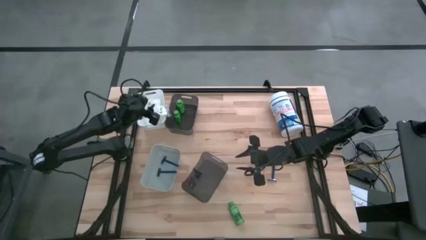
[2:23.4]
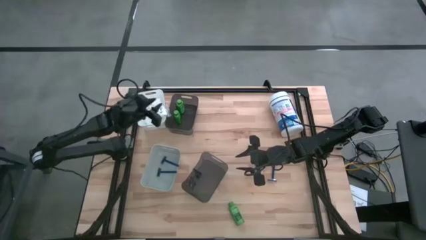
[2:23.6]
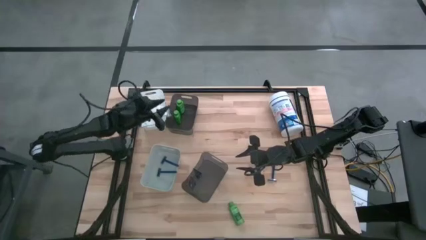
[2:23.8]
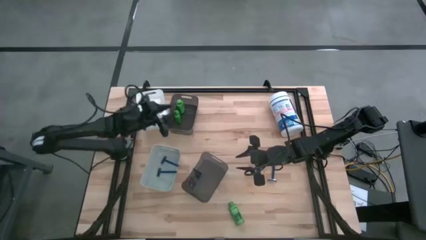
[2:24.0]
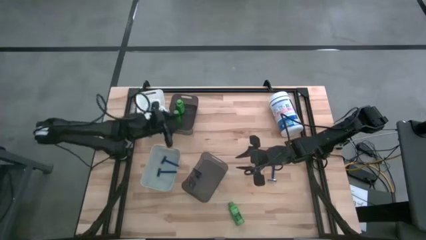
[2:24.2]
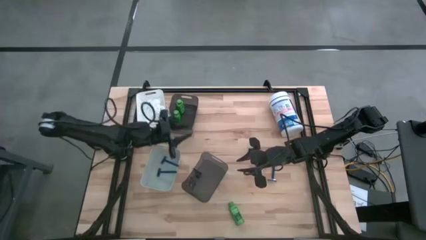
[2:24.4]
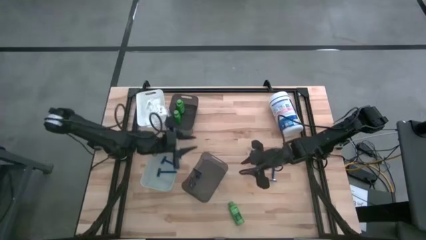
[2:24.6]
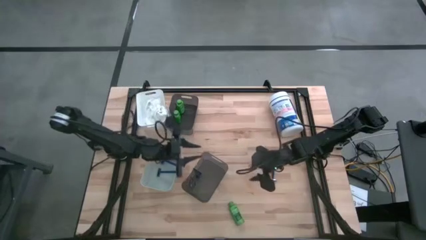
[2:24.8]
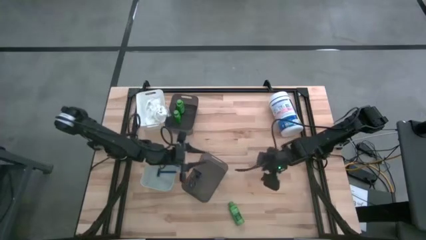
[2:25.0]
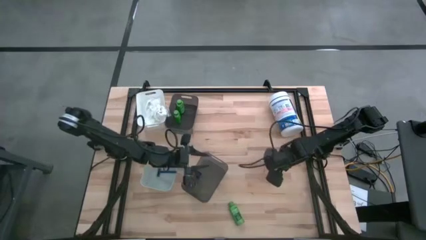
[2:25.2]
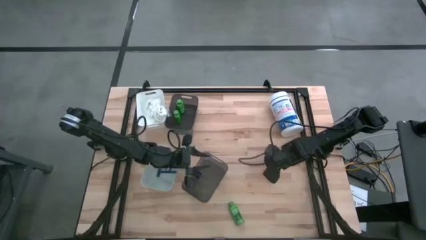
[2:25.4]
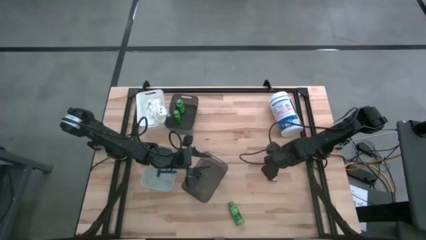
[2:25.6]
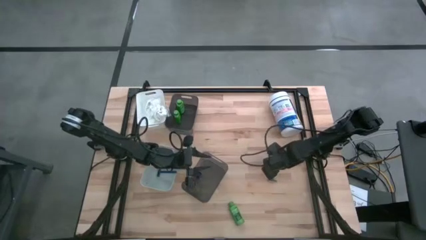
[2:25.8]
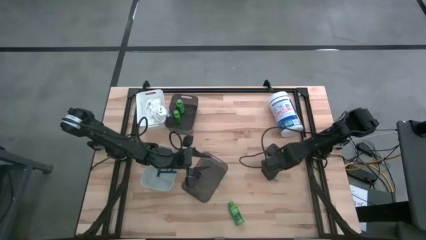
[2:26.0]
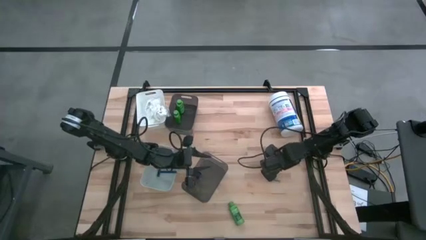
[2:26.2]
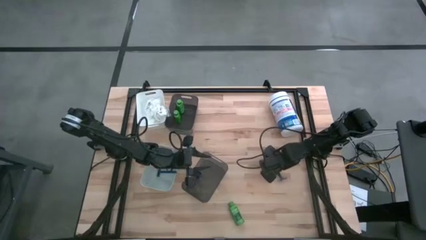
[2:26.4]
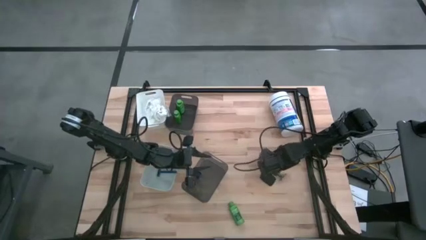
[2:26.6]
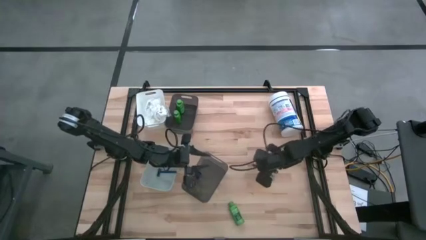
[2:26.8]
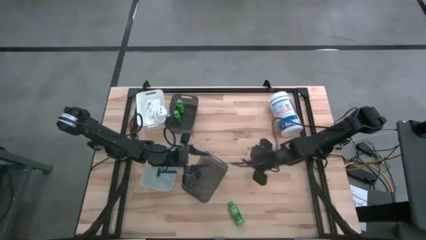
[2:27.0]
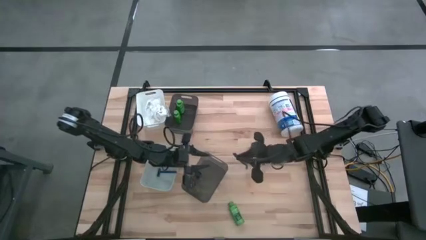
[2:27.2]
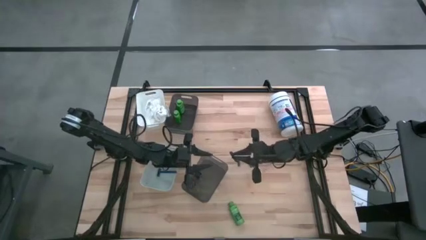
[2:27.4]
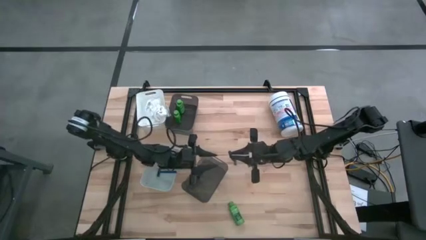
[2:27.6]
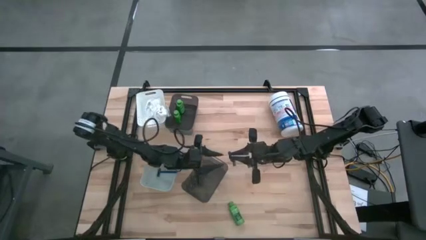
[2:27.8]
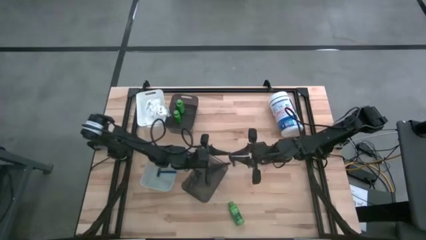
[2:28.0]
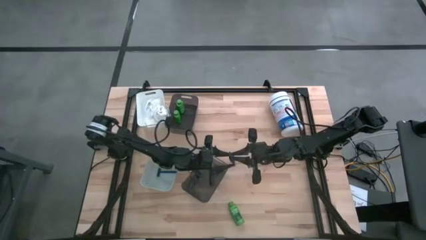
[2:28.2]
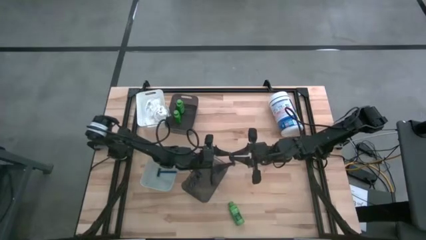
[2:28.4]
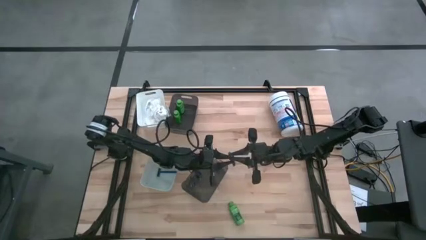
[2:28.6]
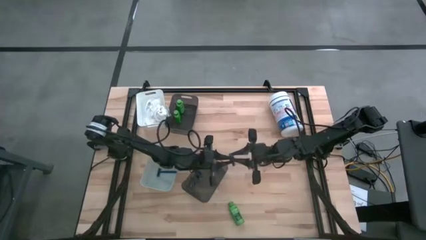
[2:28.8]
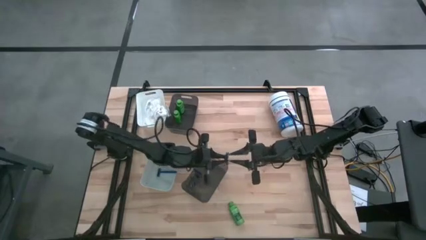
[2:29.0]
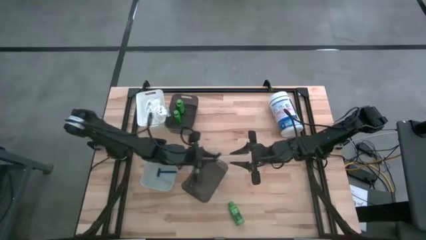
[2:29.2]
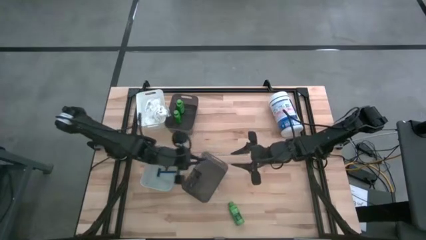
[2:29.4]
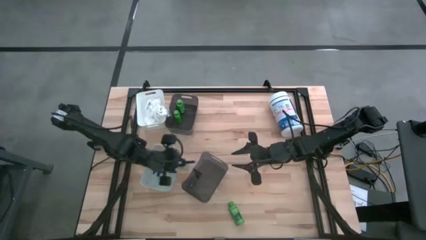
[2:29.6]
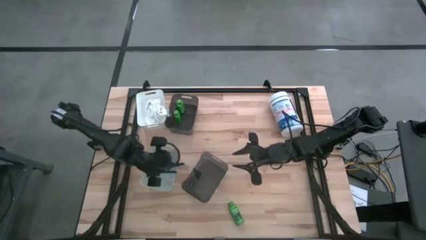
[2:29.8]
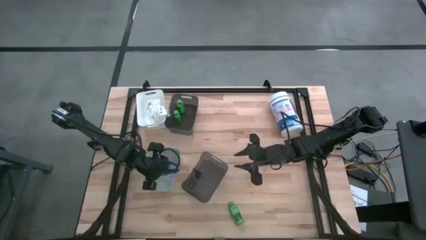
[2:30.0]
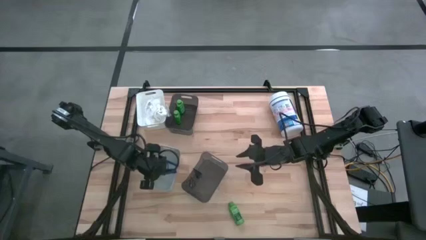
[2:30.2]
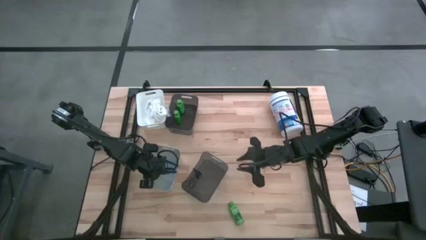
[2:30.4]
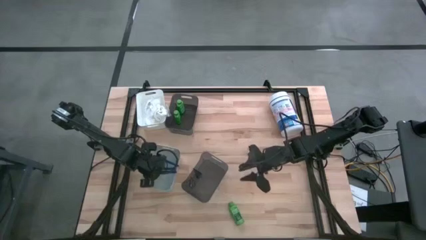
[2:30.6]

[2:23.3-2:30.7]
Task: Pick & Place Travel size toiletries
Put the blue razor into the gray bin

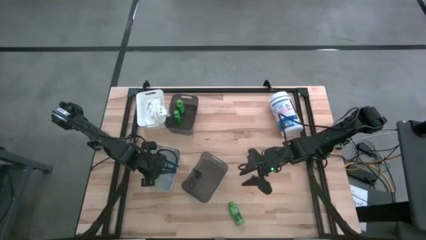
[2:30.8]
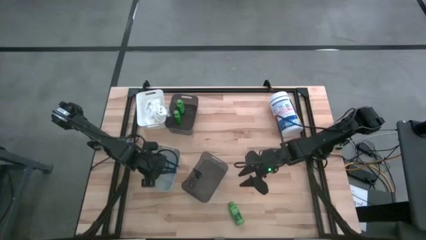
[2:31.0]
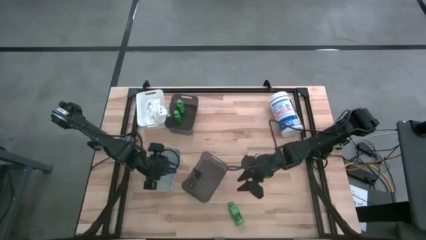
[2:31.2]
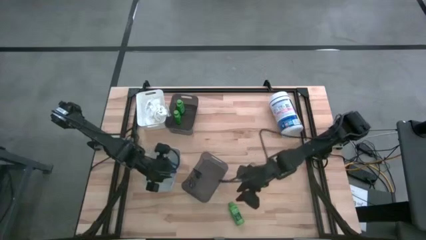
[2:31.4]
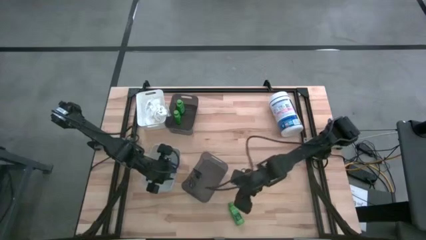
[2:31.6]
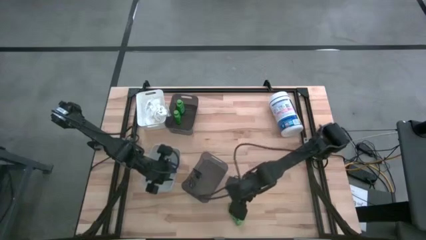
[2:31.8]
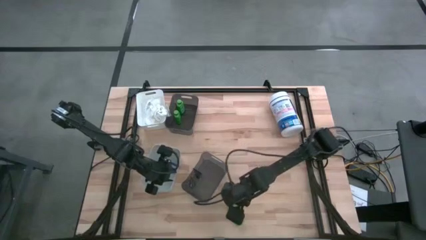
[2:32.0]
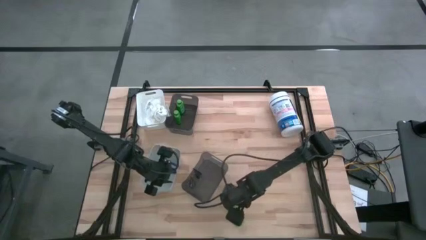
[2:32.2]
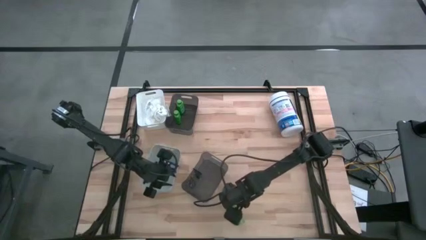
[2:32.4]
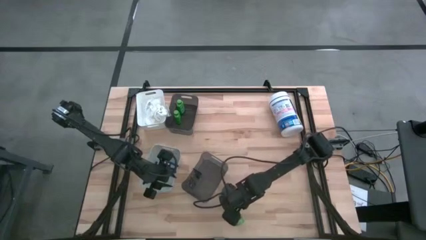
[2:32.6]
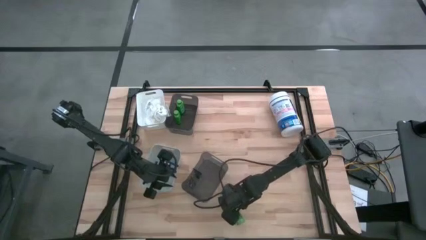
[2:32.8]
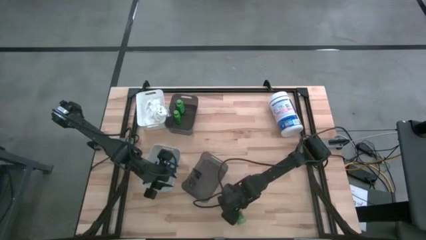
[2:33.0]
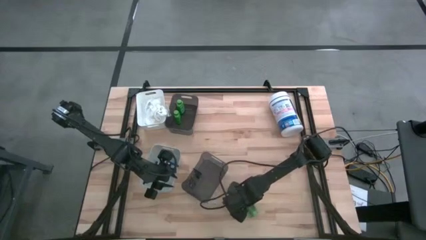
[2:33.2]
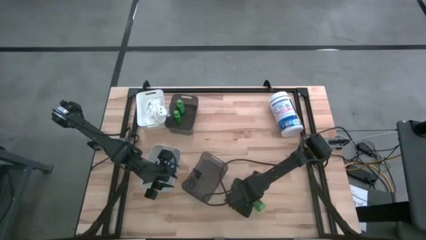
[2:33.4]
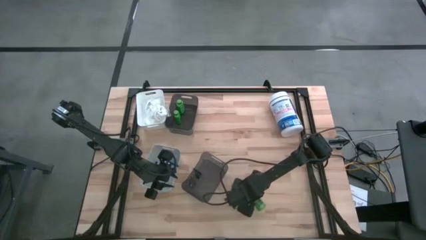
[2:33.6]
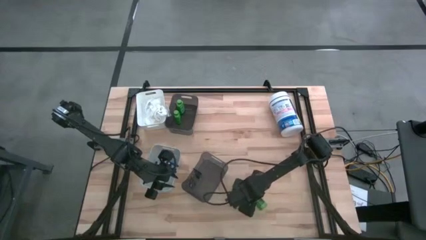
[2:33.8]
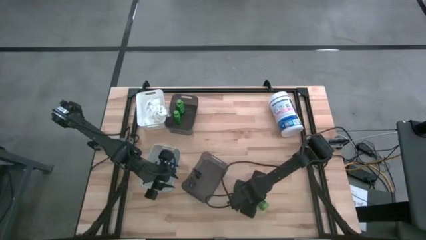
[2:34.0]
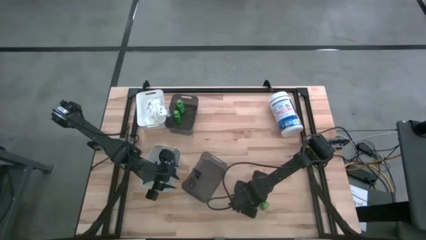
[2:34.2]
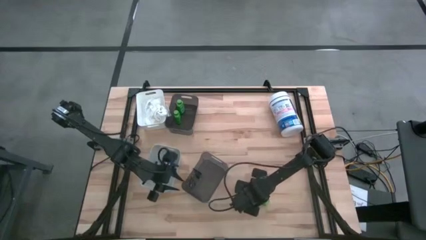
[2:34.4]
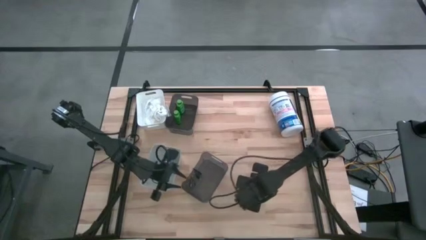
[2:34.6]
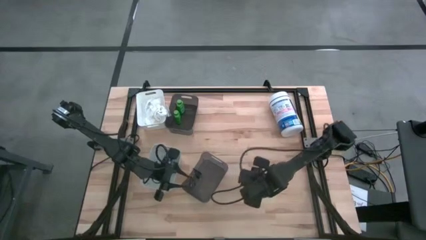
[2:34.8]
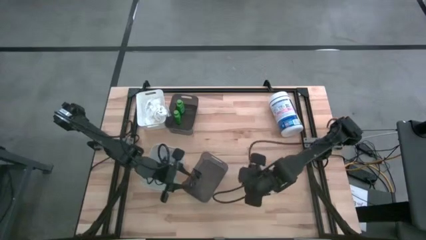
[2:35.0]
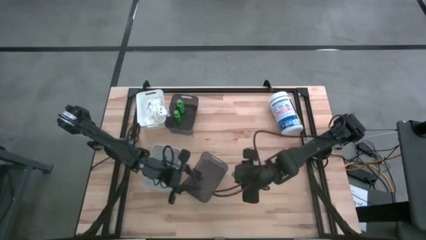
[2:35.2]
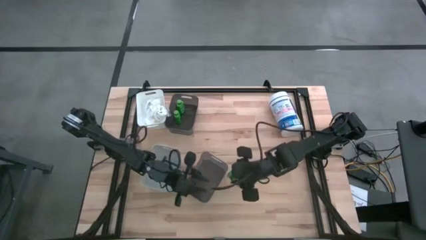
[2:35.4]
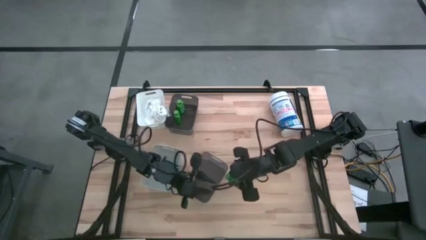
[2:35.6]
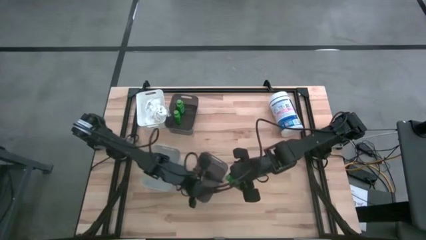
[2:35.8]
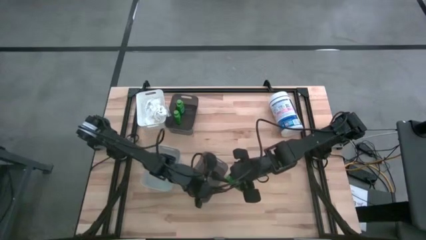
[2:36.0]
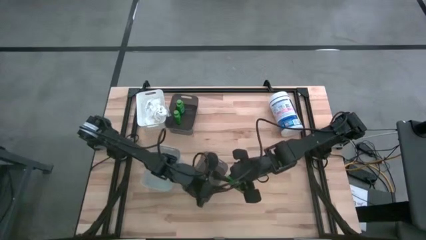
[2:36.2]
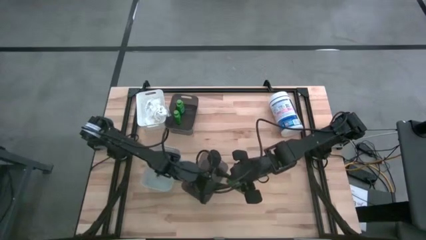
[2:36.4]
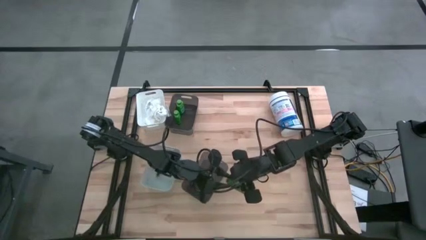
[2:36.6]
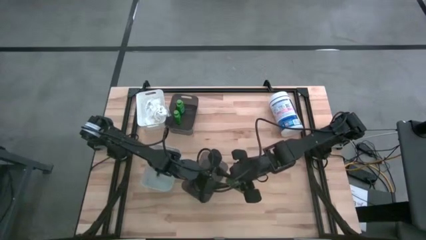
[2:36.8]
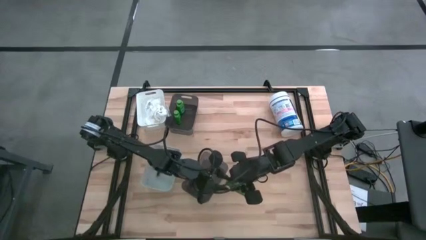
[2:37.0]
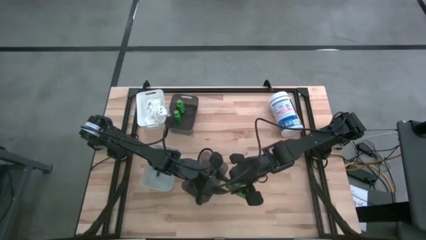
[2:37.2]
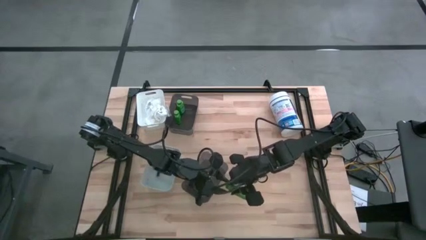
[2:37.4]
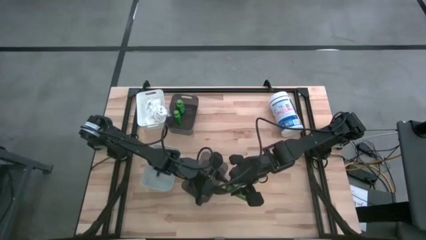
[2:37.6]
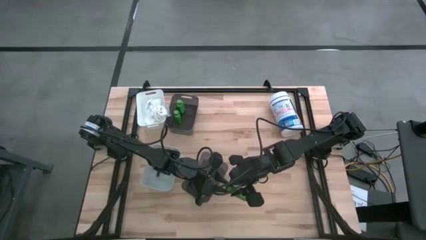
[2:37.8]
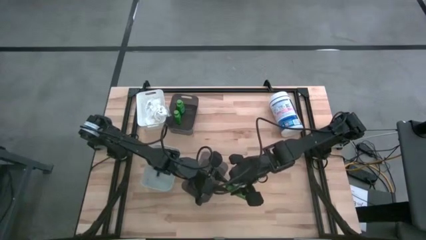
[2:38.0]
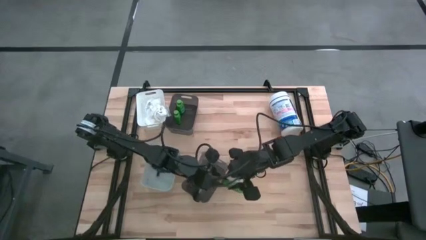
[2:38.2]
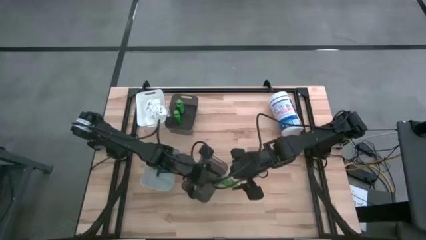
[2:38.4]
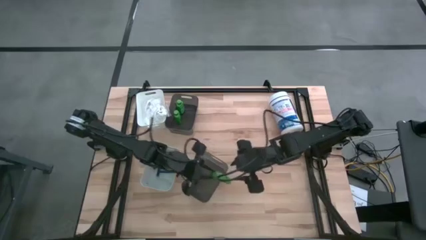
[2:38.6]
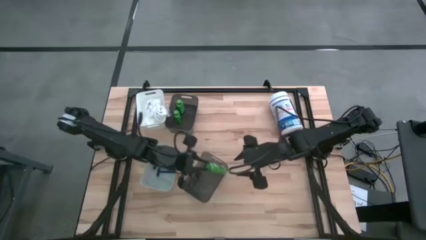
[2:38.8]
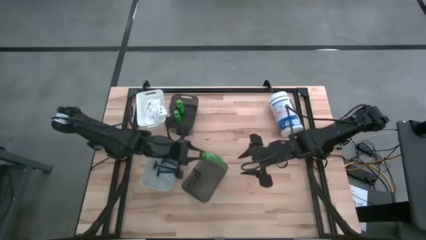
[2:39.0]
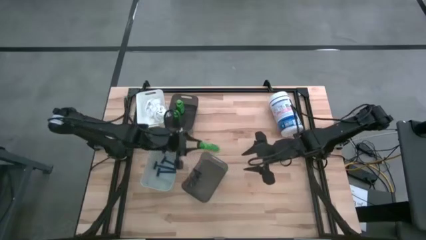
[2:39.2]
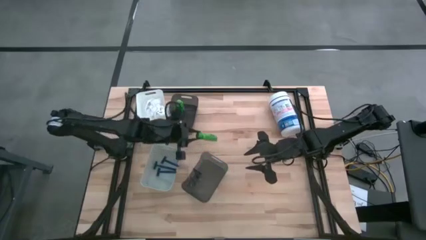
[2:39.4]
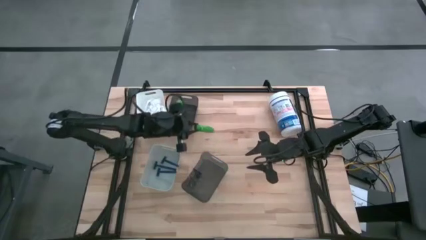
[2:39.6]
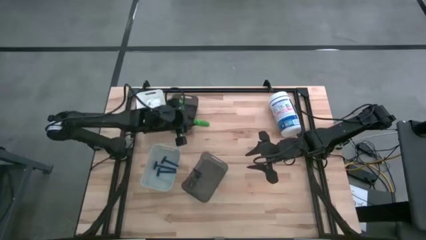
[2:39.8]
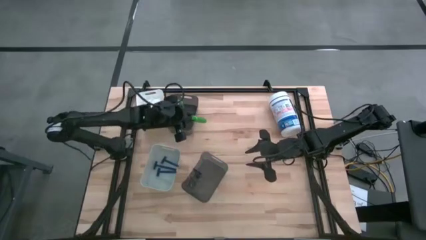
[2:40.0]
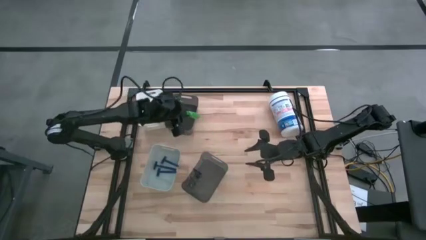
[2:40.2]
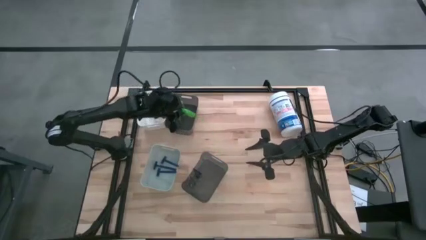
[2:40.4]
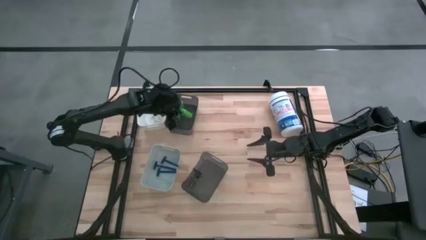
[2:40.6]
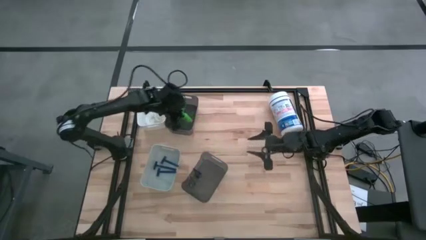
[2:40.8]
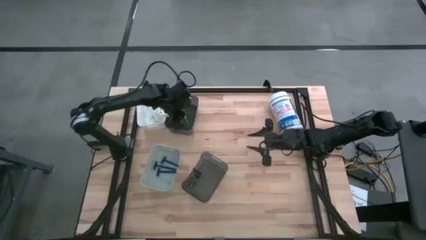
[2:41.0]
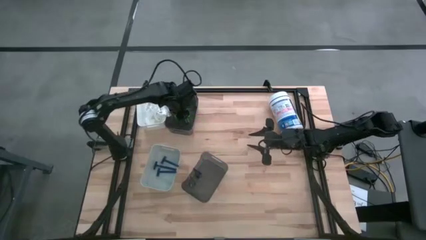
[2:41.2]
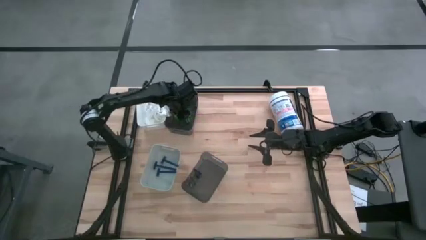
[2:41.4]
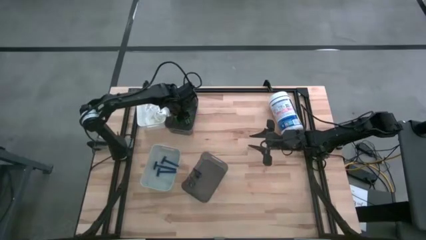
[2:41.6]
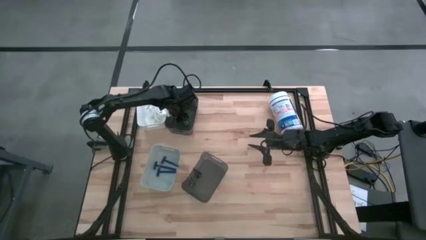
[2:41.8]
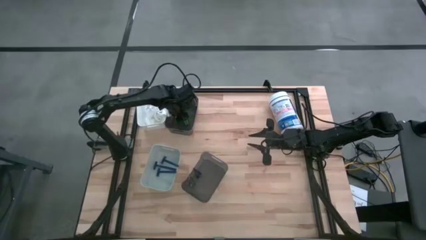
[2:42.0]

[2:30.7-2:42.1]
Put the green shampoo into the top black transparent bin
